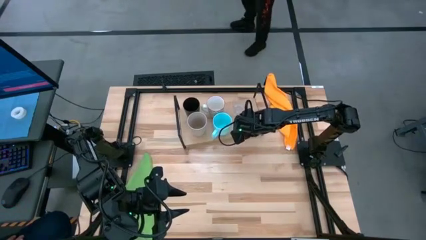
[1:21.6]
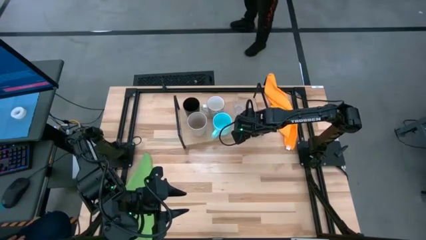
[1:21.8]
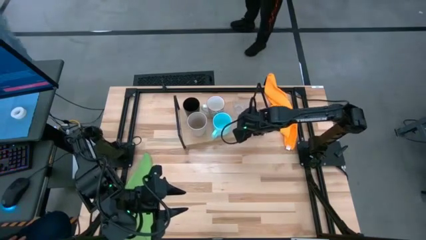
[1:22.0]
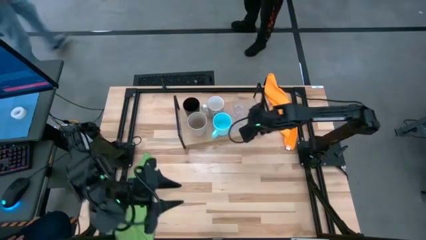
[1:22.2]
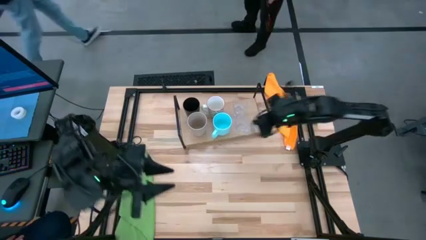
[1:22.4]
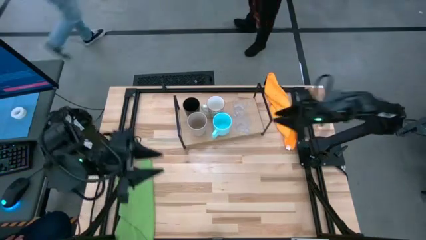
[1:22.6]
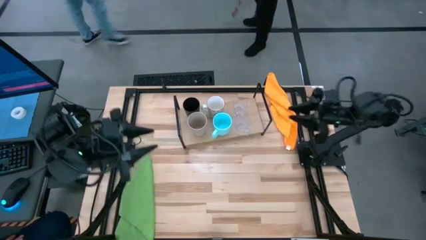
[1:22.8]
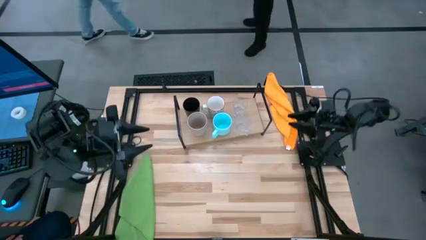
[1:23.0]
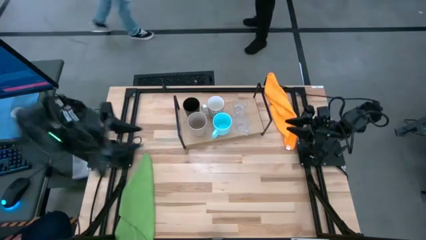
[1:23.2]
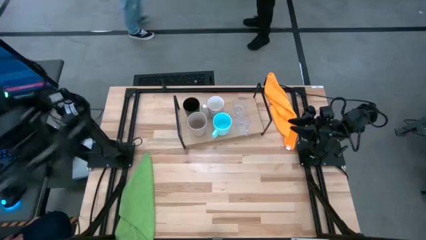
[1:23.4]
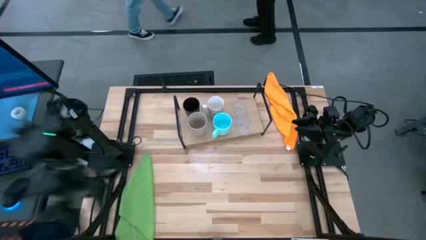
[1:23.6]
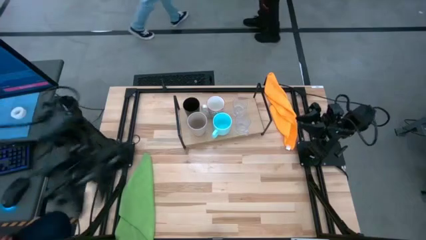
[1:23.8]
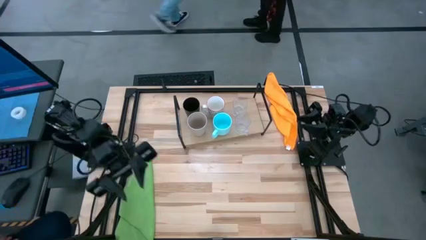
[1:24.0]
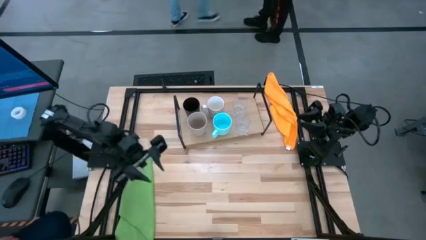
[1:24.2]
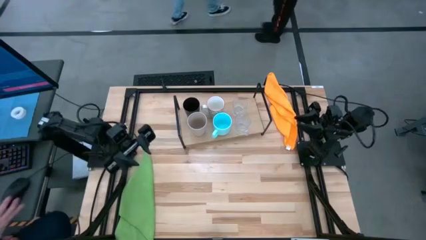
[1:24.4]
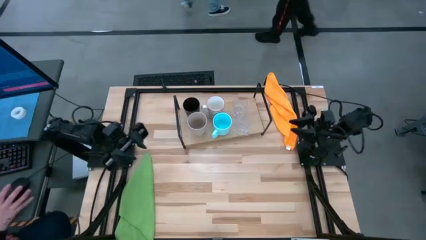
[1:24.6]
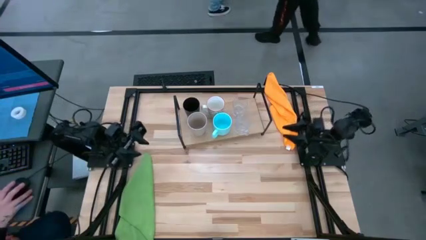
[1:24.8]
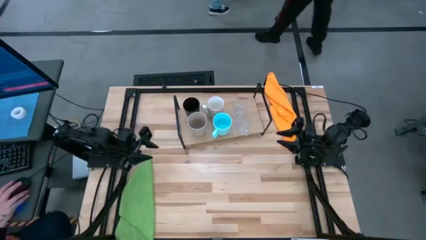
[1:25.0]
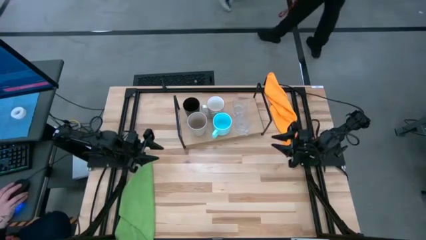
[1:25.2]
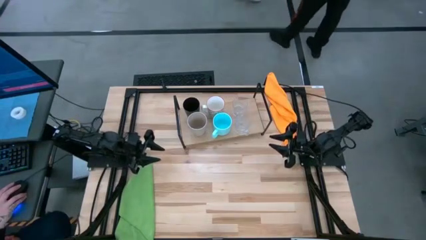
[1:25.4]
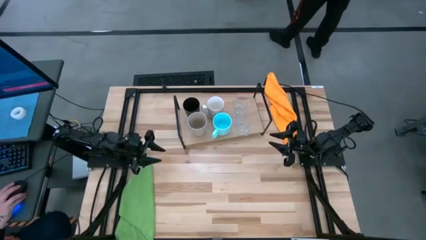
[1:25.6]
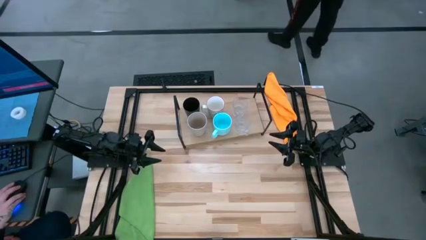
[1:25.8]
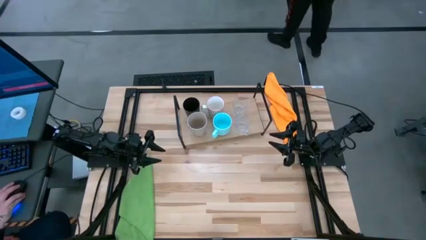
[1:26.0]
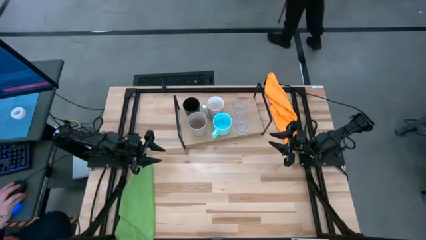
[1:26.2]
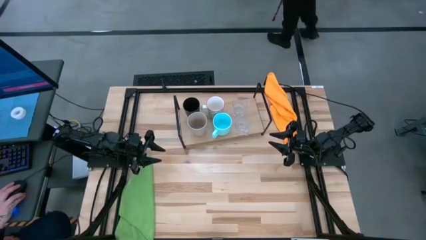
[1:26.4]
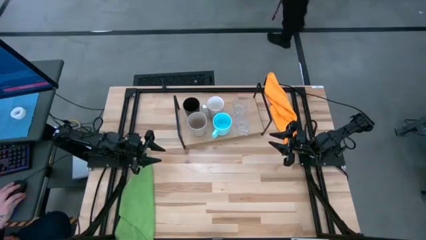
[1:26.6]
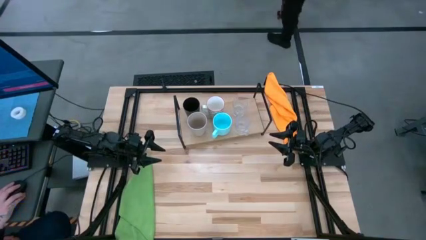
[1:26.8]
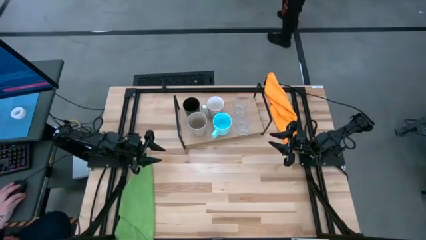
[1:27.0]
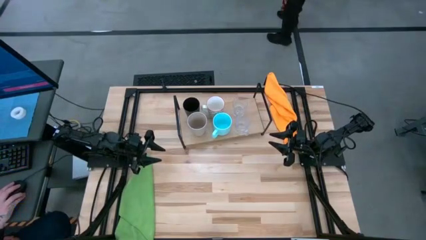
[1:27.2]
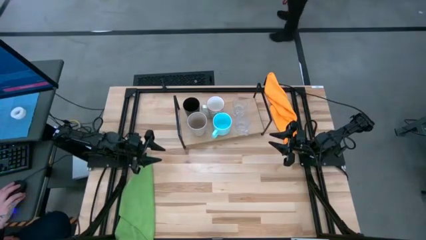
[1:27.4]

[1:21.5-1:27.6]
Task: Stack small to large cups/mugs on shelf
Return to Home Position
